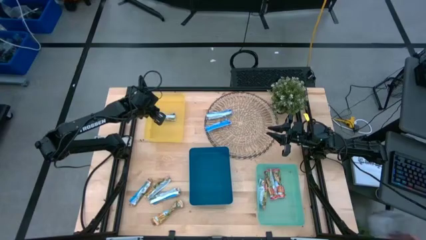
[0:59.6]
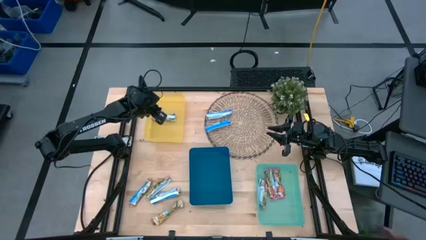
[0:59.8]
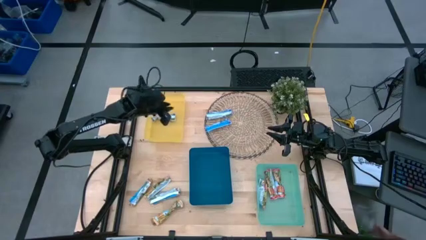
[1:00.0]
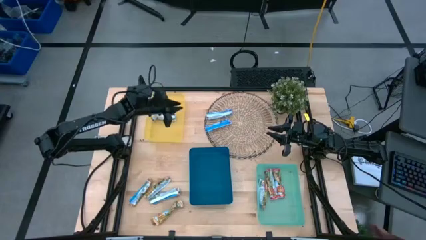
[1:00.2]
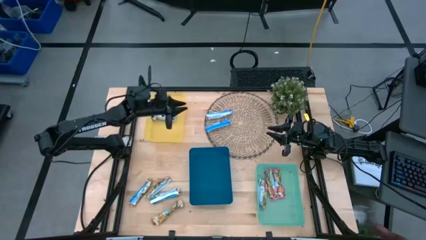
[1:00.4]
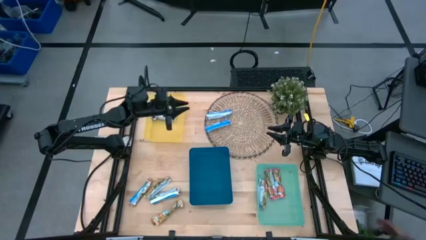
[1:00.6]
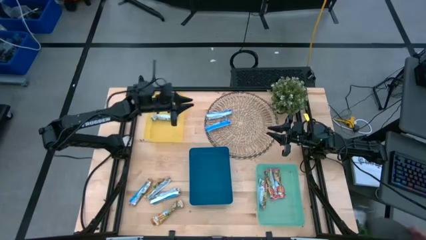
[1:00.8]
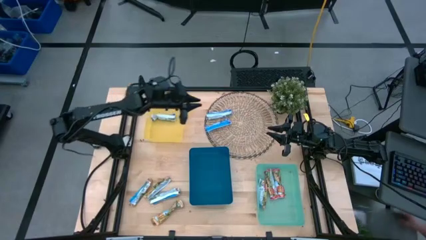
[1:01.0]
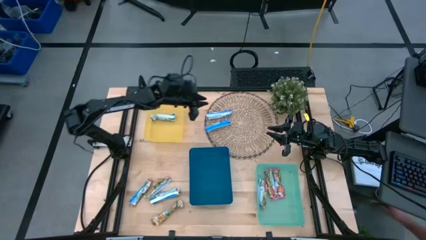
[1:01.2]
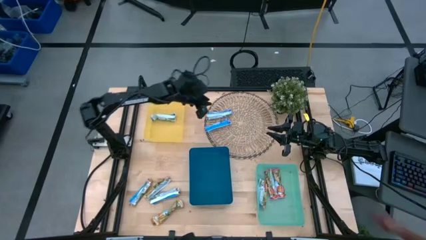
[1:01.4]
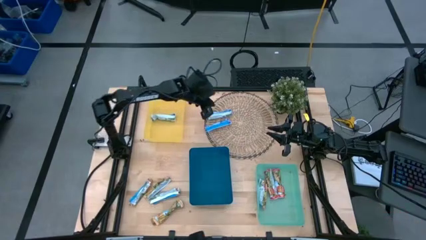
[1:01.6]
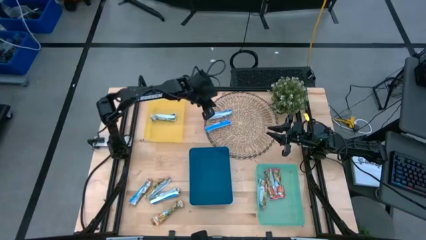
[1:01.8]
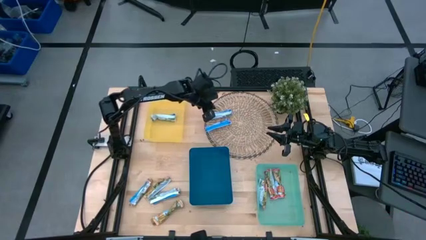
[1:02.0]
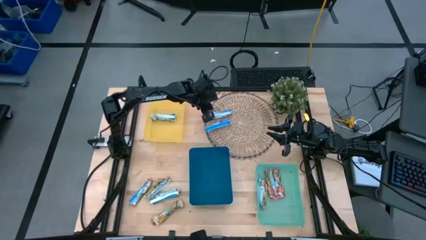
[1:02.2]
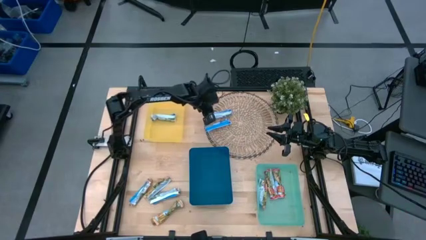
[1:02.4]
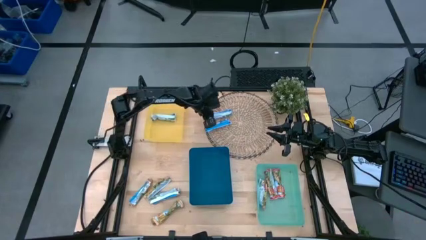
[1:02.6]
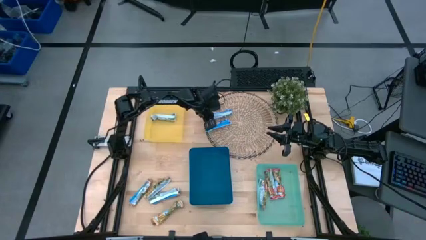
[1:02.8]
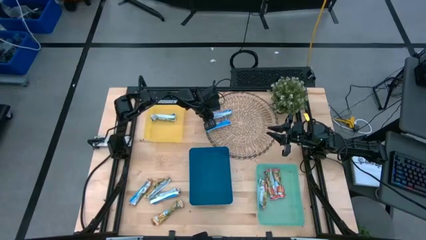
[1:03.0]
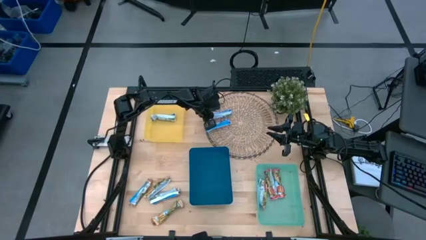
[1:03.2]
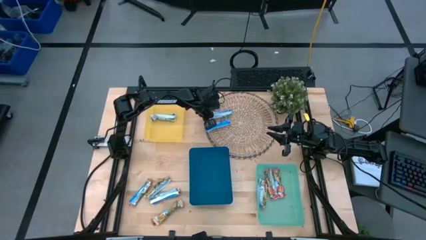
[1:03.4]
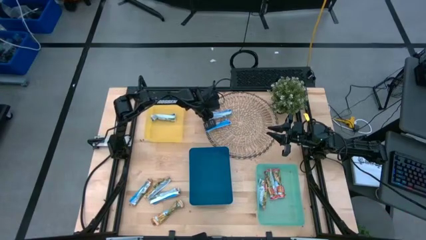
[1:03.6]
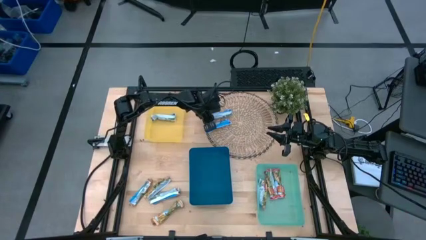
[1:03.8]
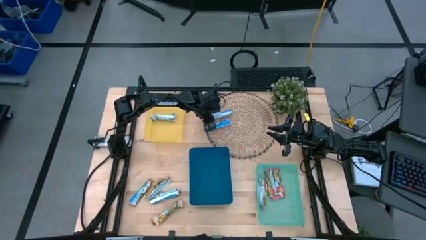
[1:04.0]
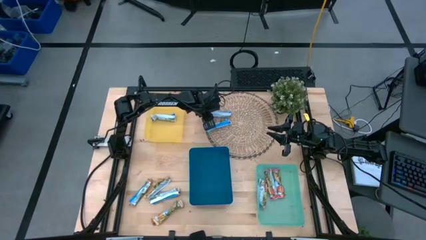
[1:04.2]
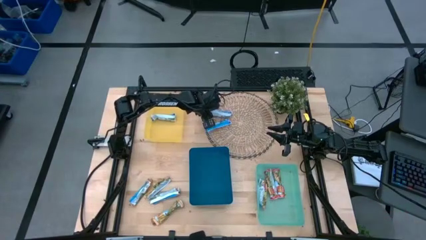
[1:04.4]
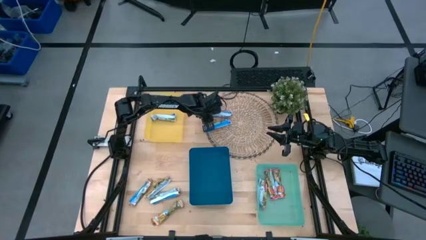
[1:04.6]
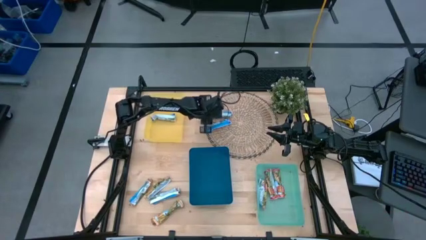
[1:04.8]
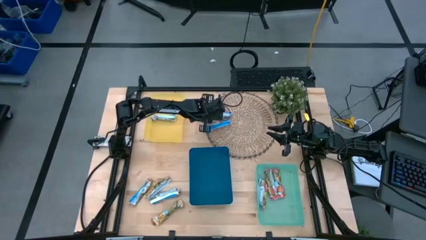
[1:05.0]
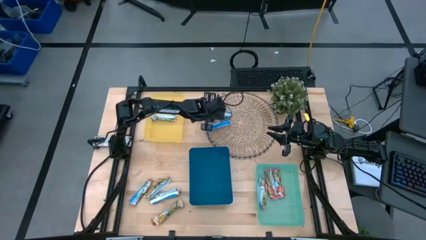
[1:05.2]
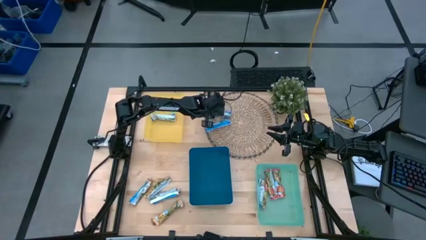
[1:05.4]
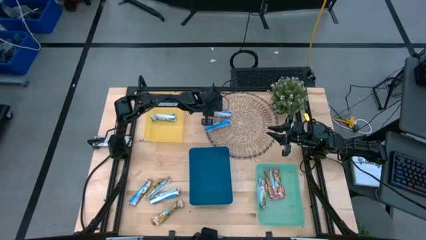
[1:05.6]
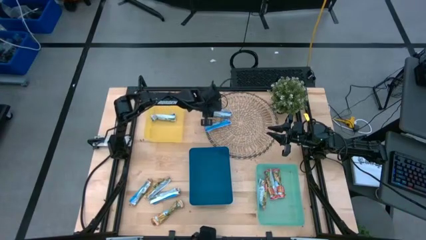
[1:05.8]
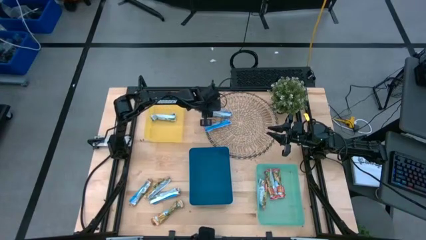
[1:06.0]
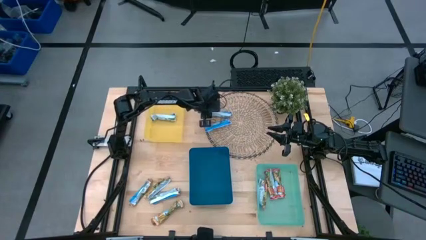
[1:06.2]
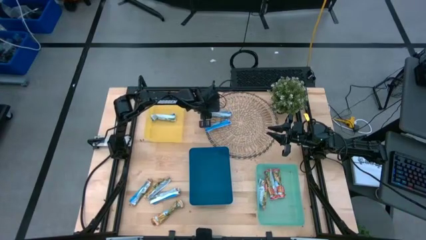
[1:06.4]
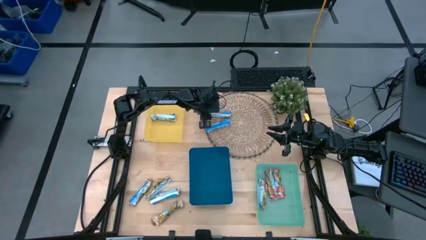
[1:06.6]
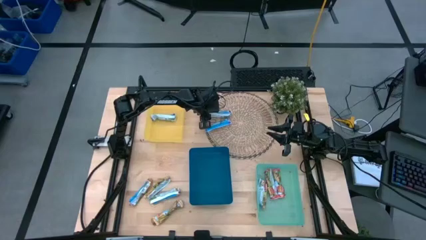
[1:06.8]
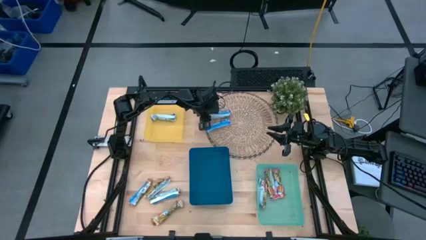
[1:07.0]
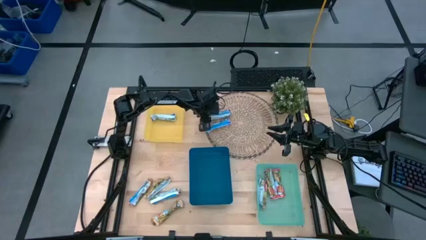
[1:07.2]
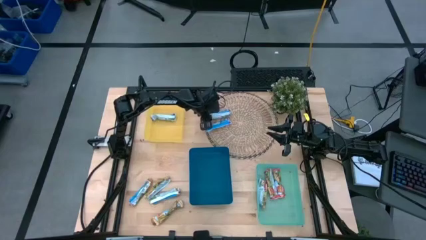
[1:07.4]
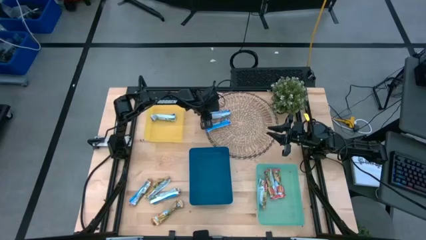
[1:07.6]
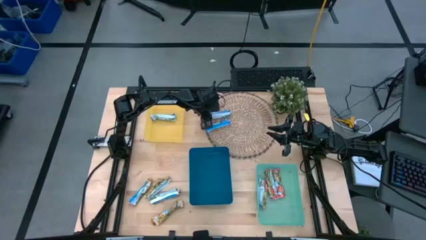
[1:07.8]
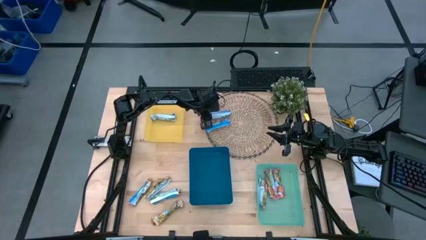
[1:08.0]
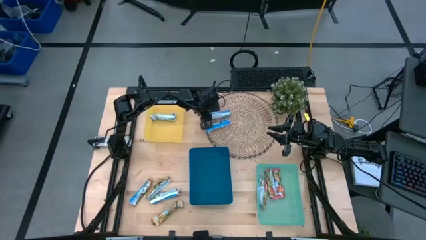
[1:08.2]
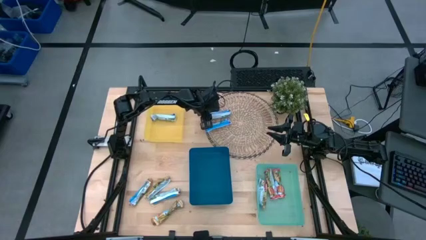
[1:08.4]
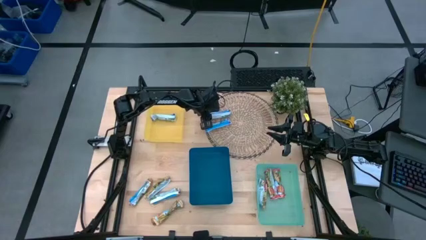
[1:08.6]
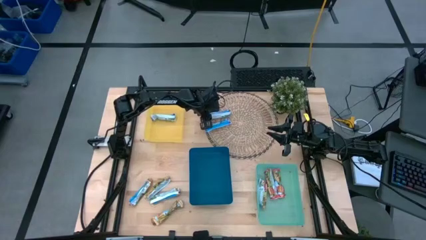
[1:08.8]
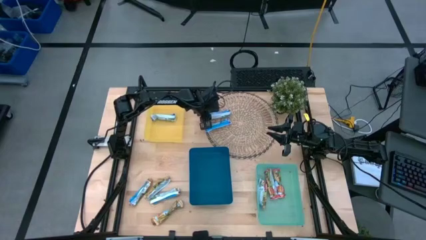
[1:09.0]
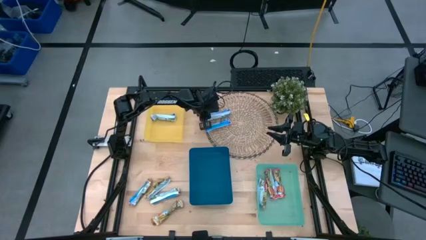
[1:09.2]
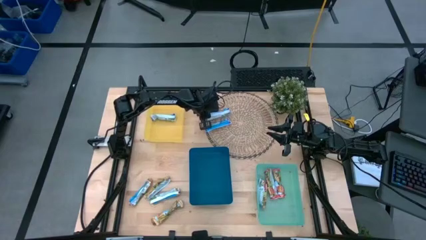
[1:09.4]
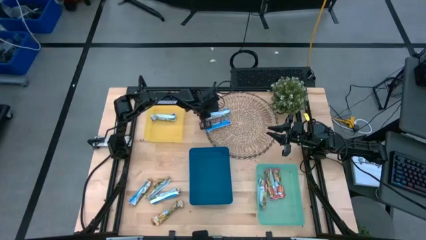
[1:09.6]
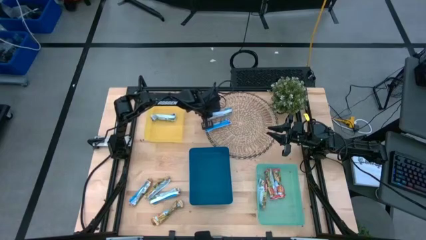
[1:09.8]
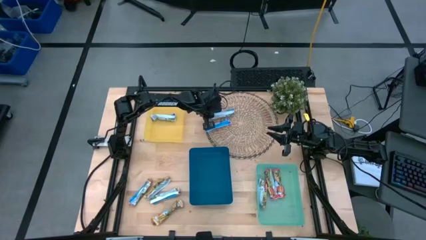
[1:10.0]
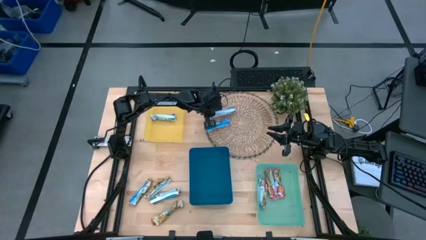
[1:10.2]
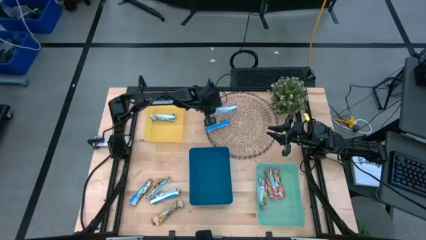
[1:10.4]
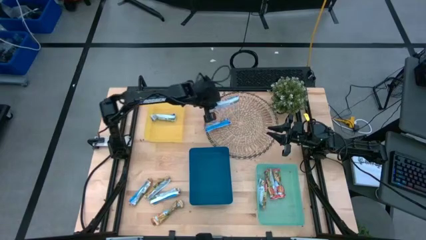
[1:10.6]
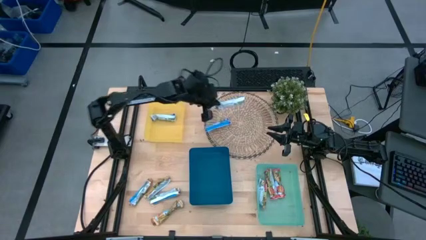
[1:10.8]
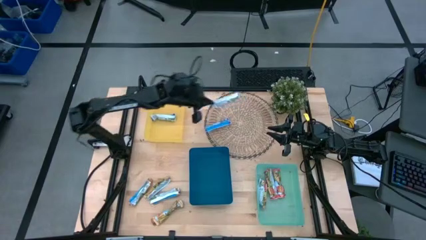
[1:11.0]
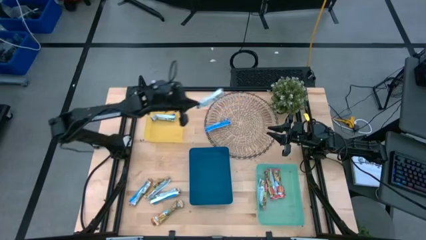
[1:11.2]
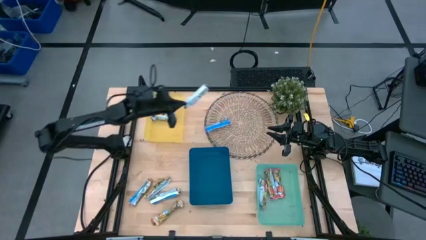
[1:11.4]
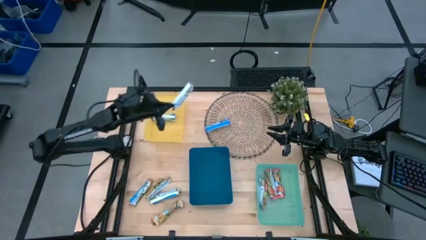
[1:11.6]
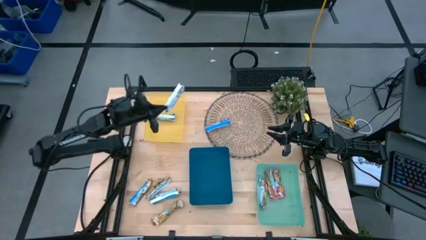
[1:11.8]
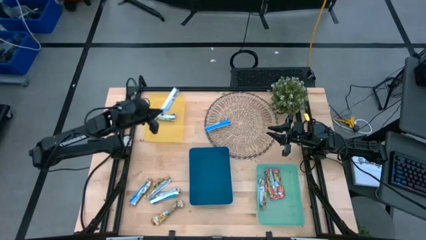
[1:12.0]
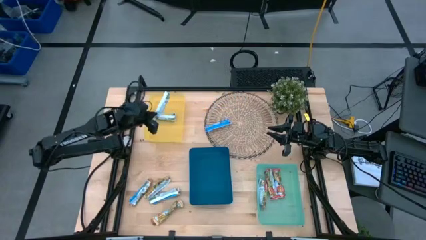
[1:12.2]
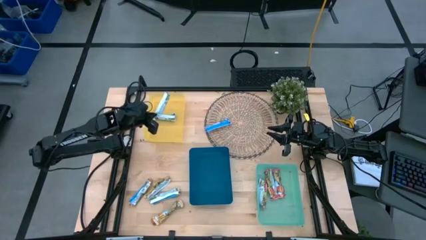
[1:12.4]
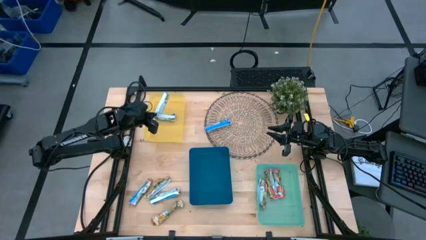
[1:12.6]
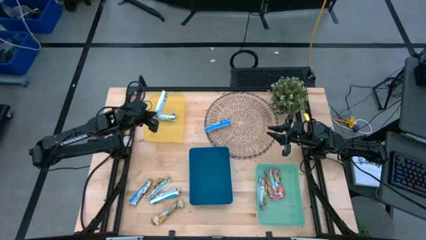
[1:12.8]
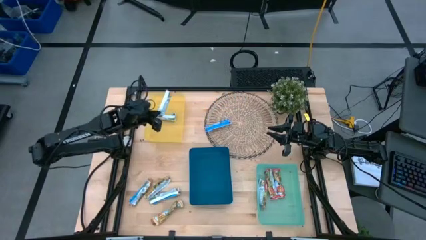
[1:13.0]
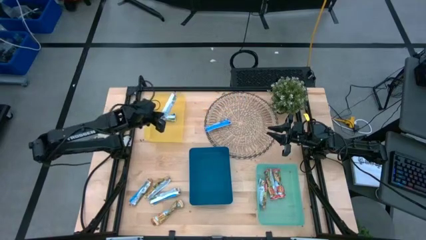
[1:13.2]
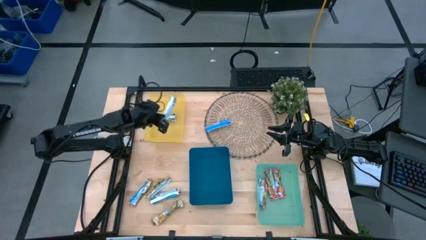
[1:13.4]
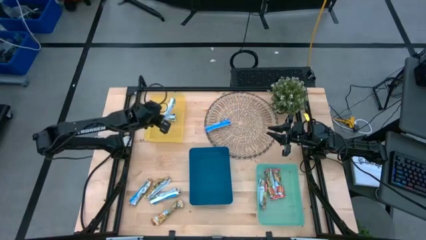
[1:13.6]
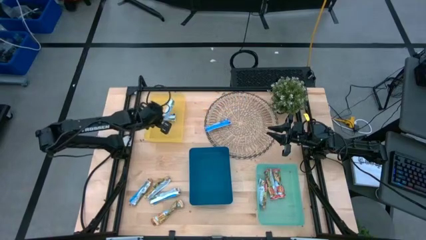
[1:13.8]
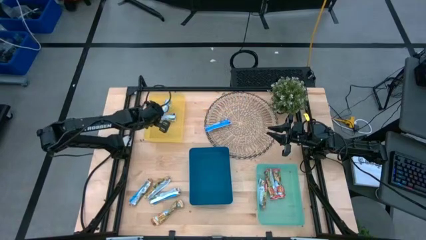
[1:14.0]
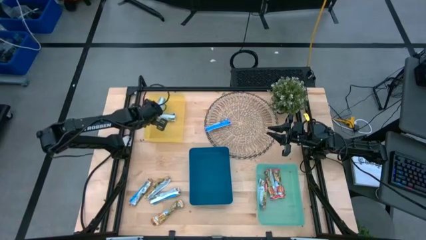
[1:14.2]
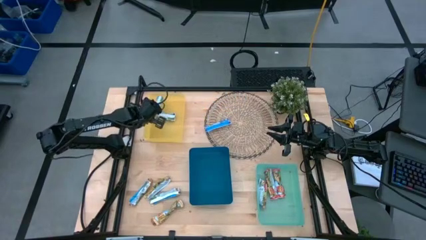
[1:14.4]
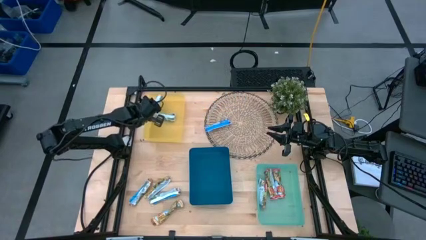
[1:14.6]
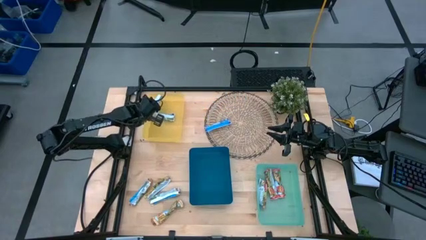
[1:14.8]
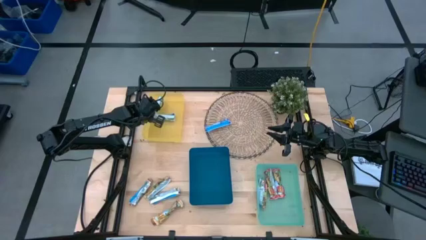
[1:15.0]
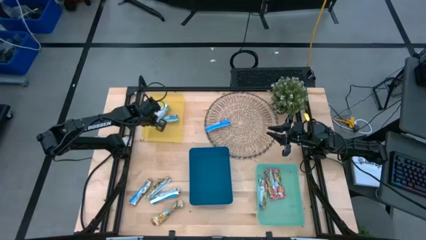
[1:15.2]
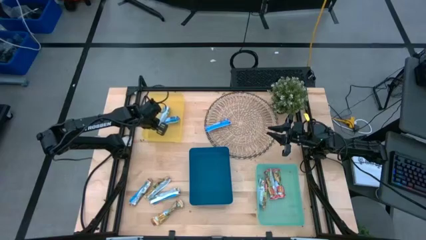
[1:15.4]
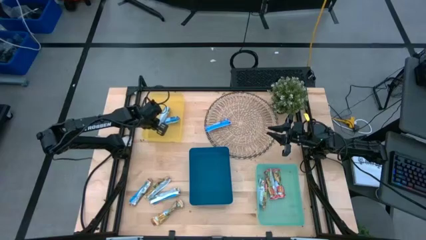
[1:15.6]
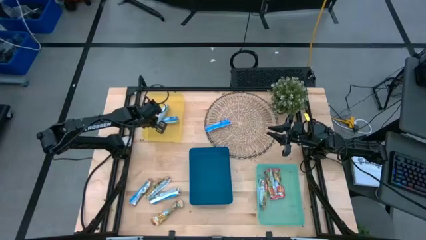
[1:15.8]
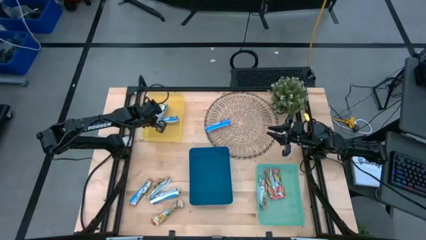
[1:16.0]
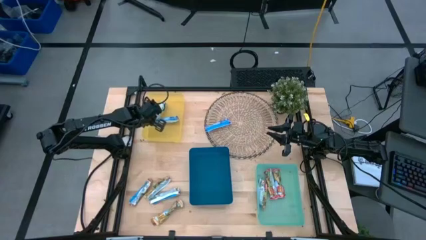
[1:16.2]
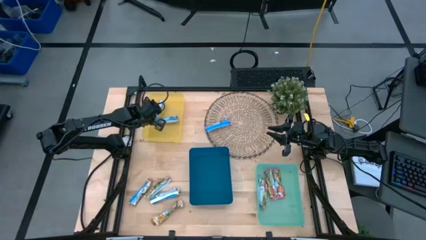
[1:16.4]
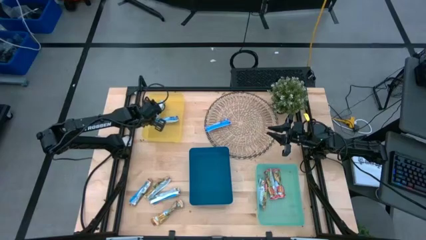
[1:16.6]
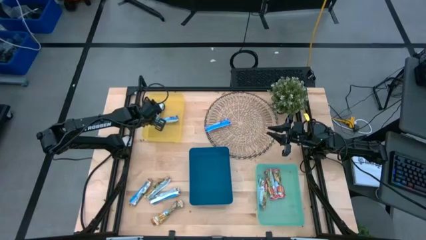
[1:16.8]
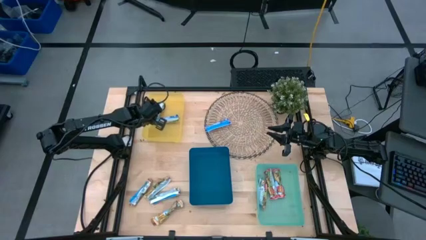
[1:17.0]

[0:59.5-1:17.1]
Task: Pick and place Granola Bars by type
Put the blue granola bar into the yellow bin
